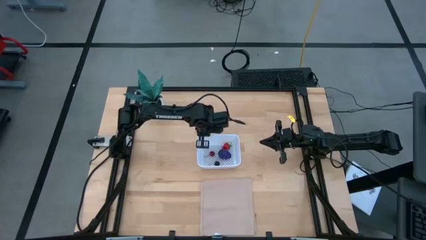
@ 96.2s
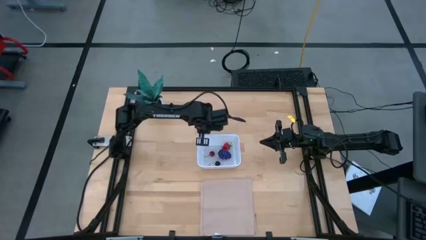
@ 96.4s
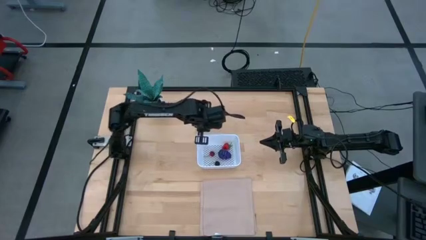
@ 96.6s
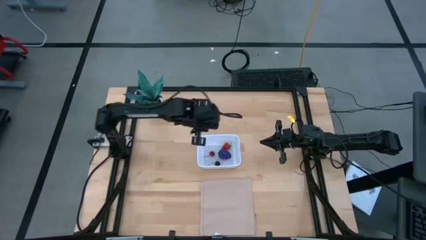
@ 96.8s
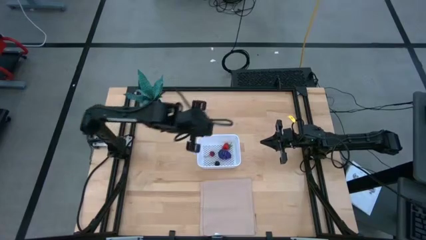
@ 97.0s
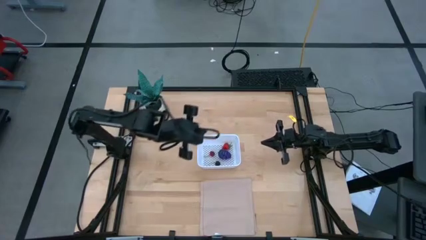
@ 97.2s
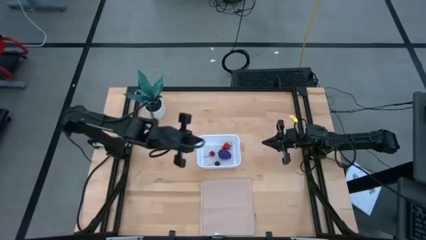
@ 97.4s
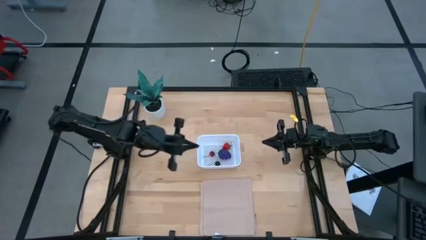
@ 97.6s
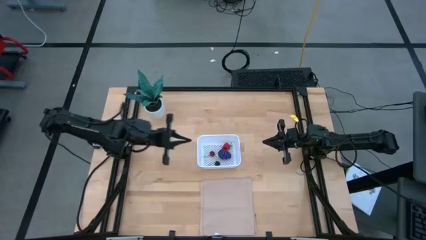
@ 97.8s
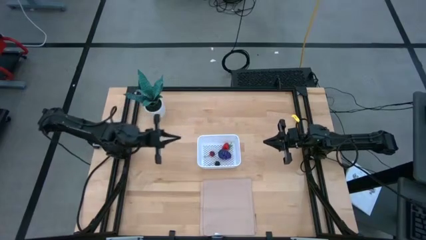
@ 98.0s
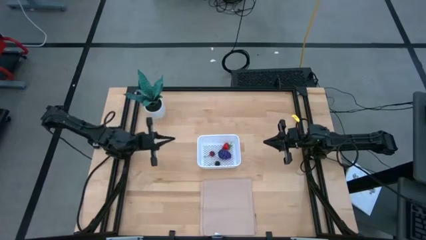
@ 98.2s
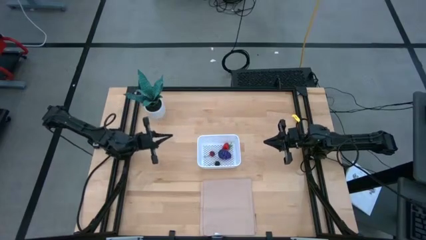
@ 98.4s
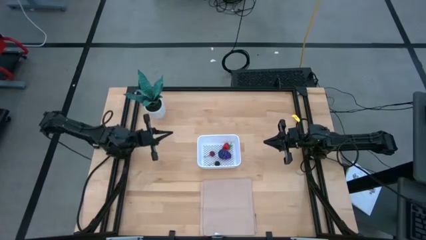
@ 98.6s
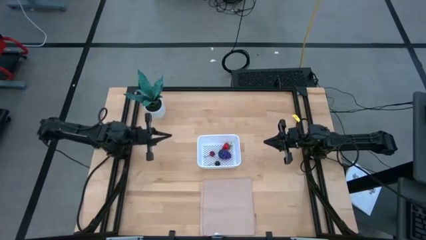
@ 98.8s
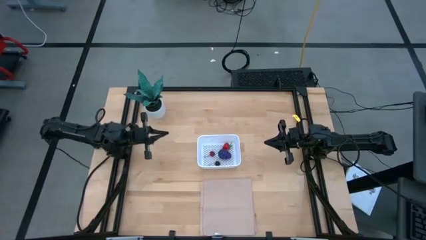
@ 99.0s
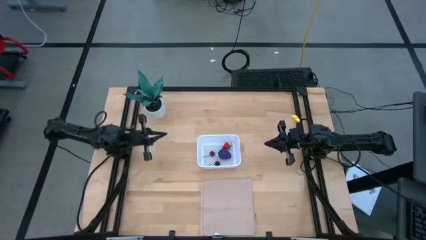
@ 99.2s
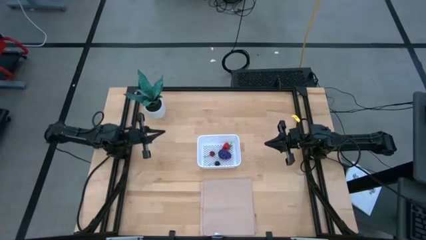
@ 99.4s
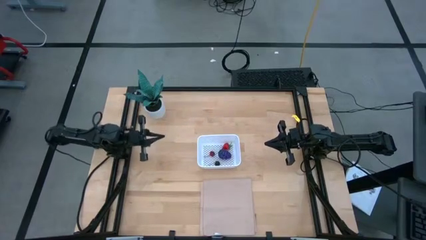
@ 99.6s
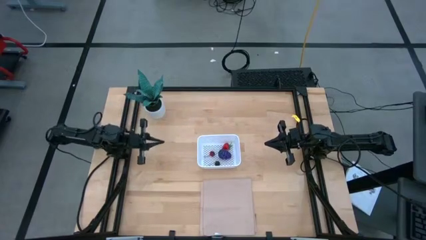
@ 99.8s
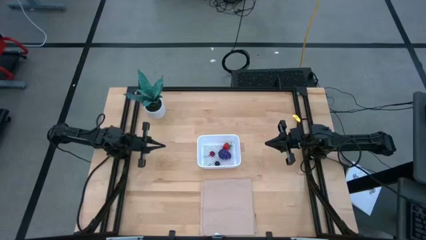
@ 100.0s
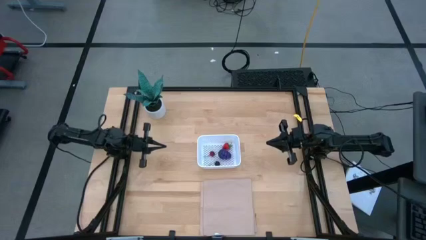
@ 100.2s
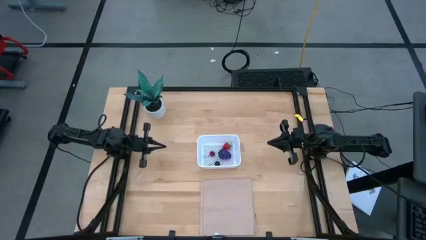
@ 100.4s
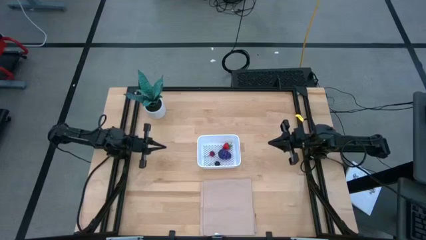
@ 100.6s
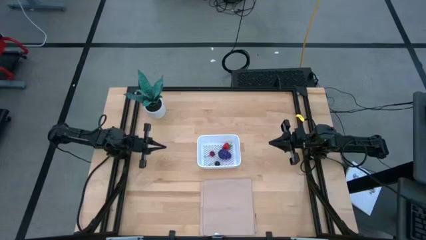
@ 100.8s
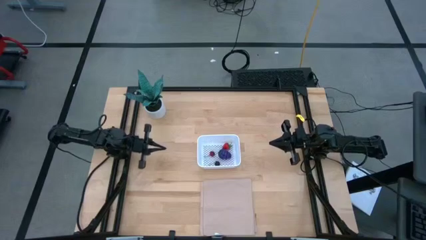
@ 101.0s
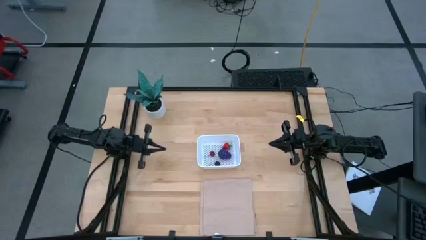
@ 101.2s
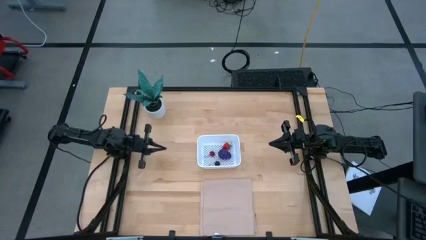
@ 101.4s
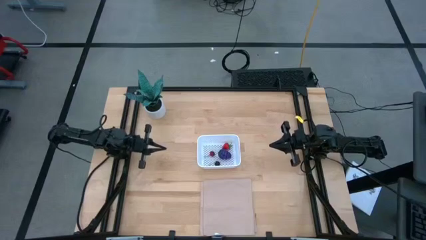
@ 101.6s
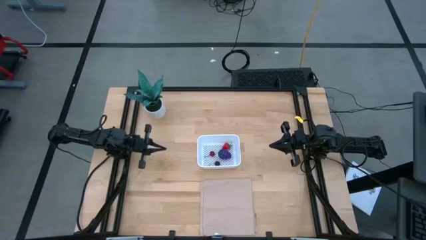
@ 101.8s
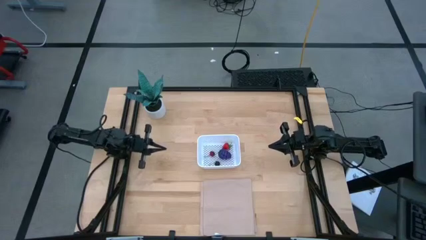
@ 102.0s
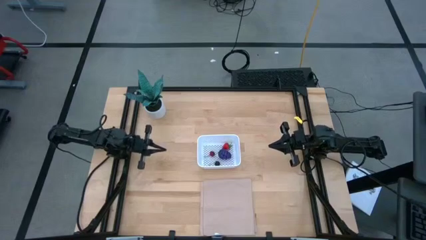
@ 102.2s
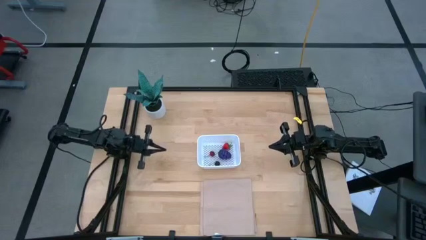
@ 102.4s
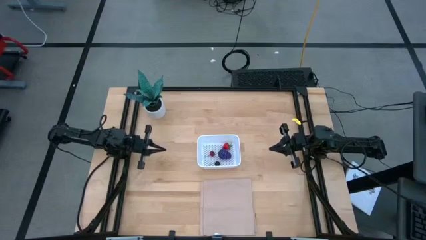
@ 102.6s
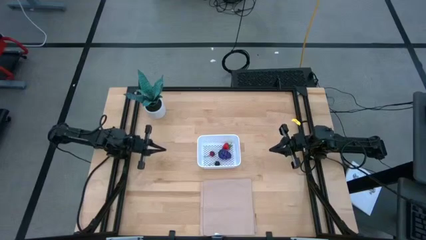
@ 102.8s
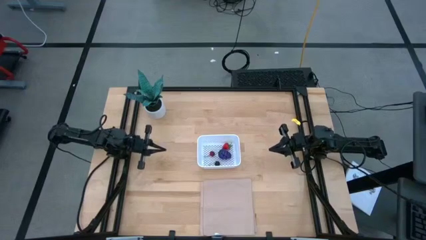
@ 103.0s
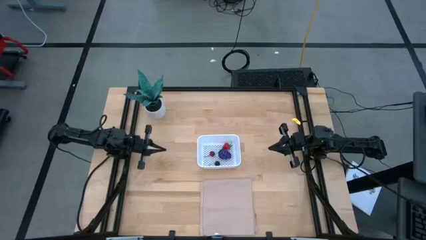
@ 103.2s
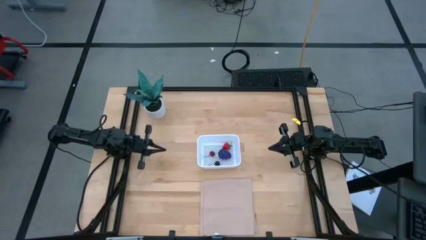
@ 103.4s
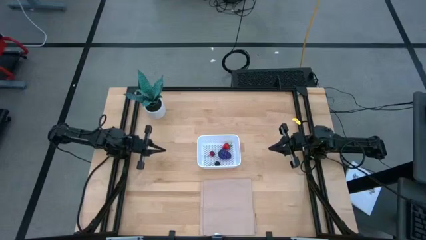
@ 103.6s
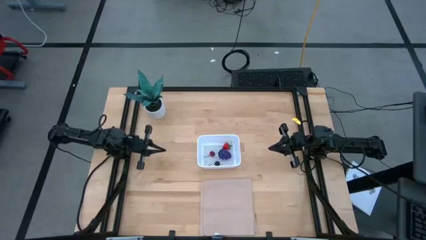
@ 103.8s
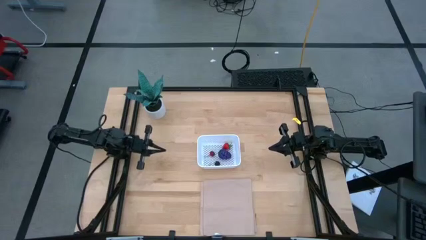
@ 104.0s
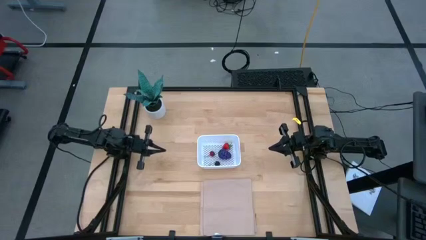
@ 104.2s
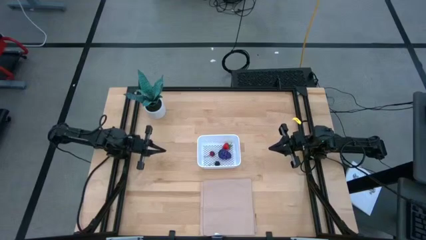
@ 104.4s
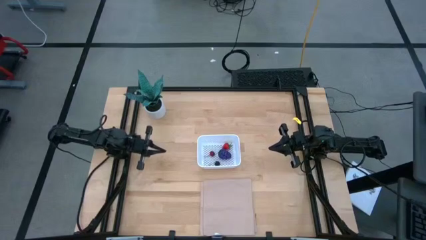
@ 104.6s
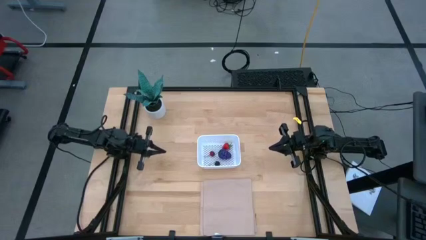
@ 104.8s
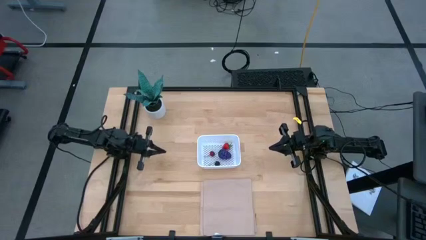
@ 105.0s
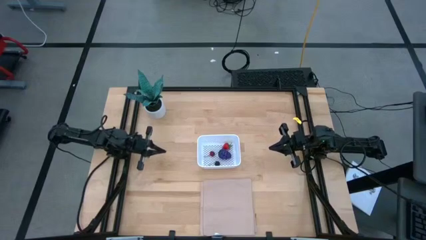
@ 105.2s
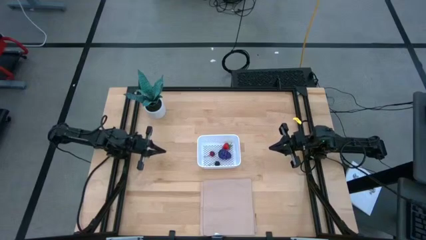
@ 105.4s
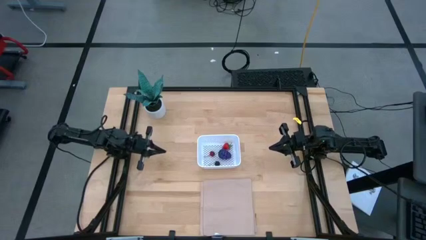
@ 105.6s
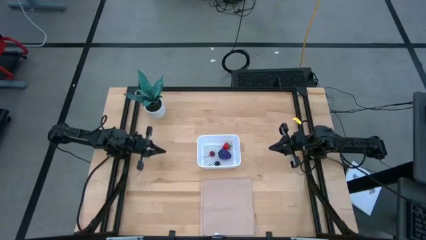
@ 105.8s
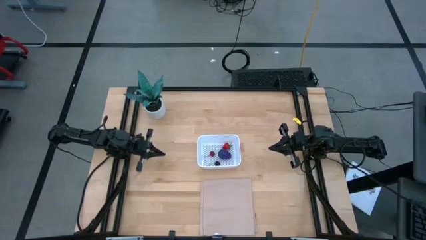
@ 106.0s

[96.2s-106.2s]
Task: Pick and placing Produce into tupperware
Return to home position

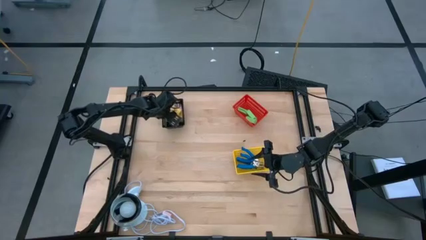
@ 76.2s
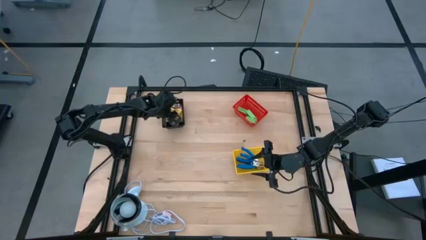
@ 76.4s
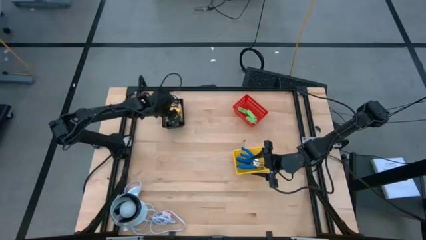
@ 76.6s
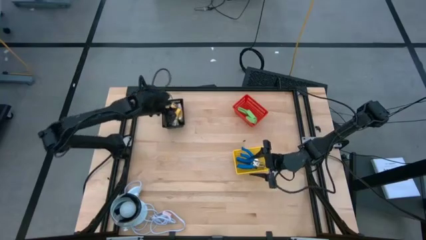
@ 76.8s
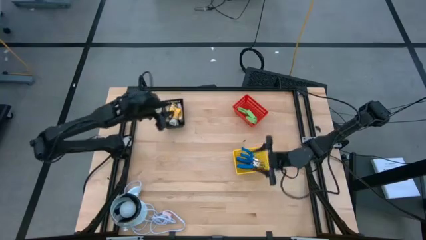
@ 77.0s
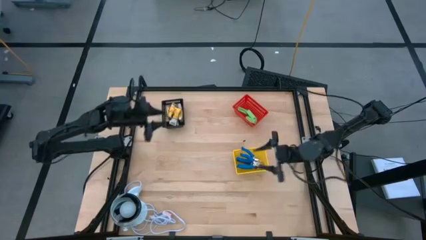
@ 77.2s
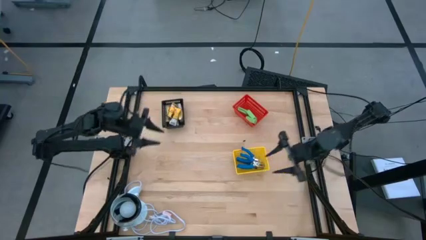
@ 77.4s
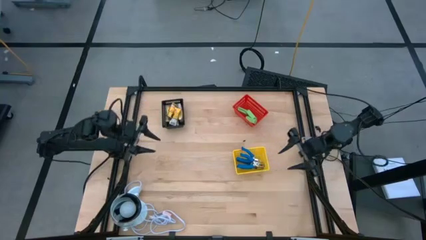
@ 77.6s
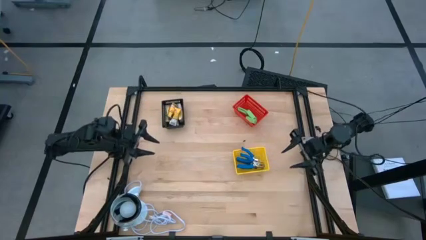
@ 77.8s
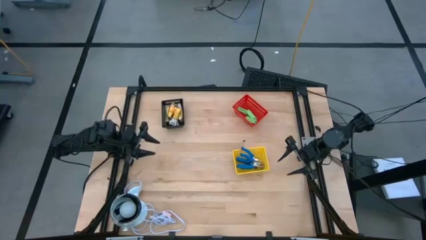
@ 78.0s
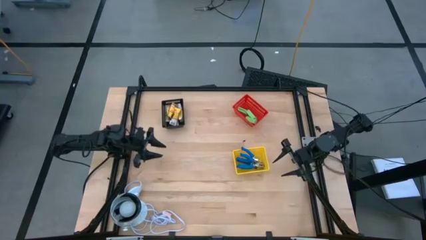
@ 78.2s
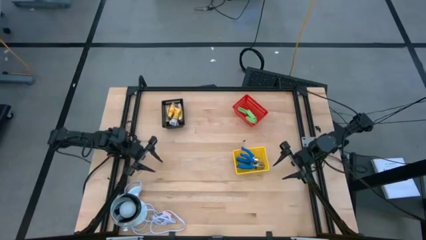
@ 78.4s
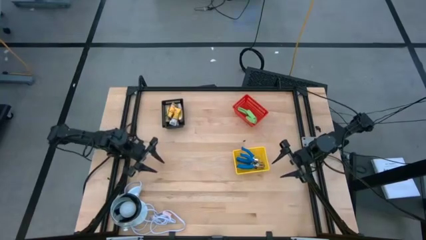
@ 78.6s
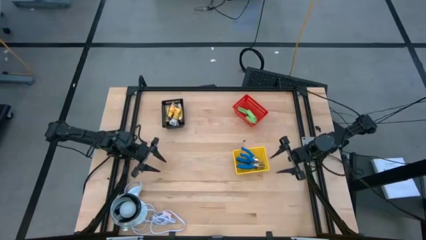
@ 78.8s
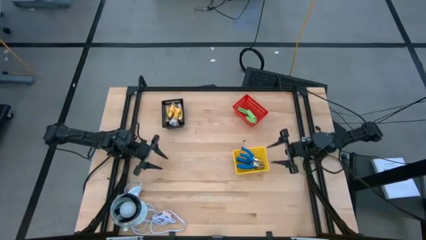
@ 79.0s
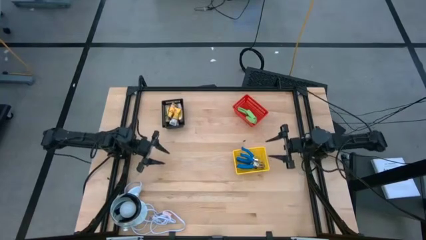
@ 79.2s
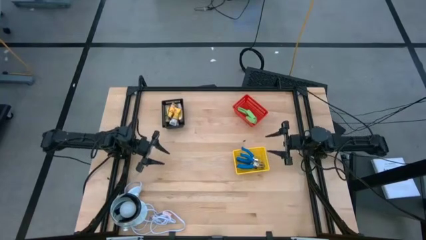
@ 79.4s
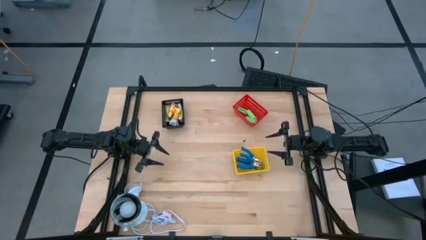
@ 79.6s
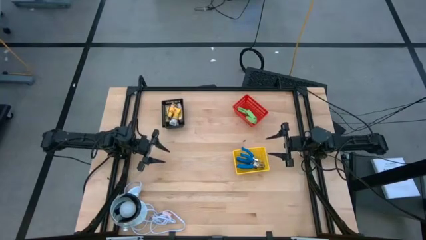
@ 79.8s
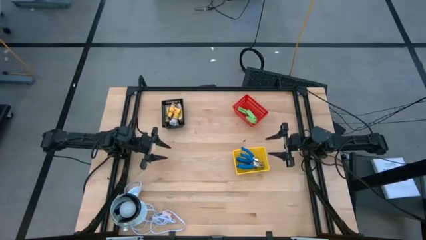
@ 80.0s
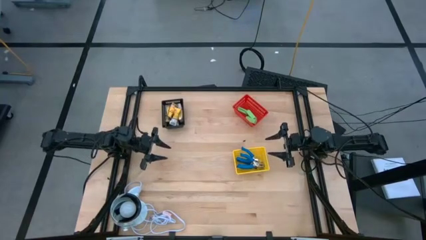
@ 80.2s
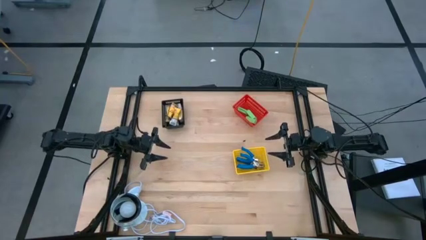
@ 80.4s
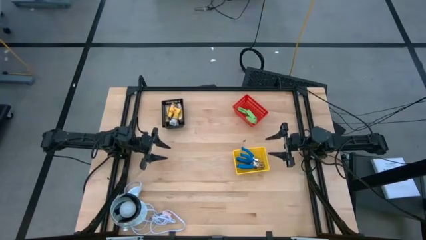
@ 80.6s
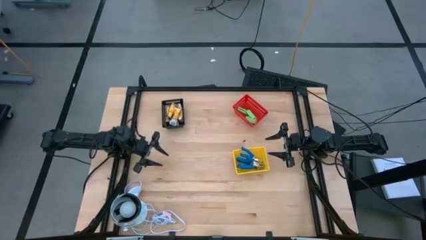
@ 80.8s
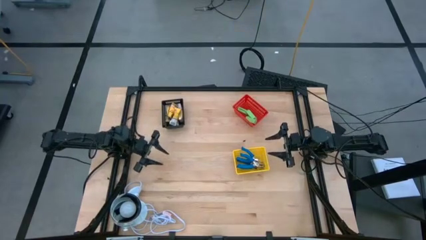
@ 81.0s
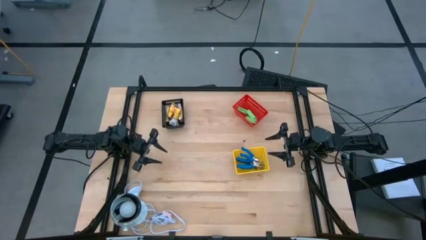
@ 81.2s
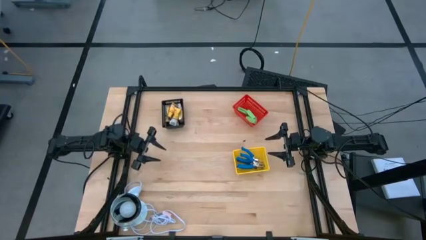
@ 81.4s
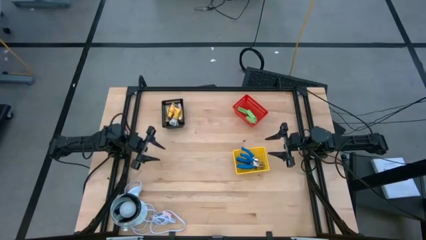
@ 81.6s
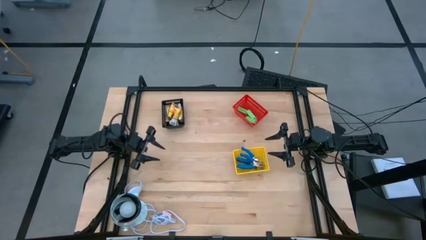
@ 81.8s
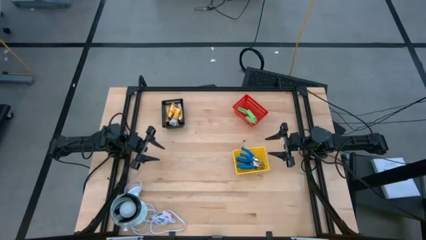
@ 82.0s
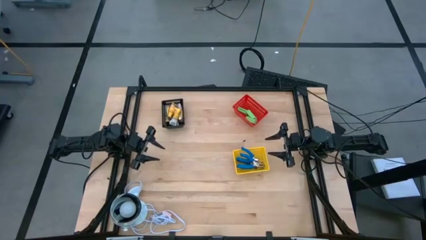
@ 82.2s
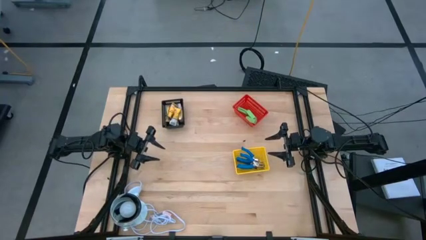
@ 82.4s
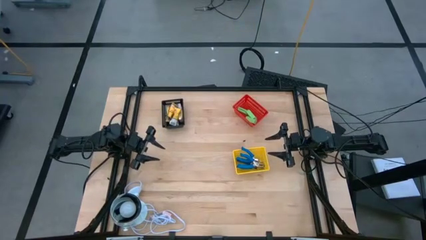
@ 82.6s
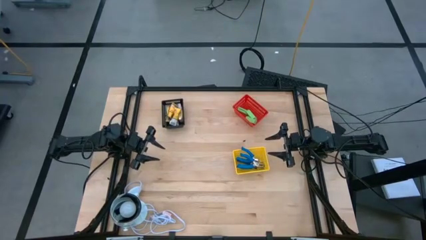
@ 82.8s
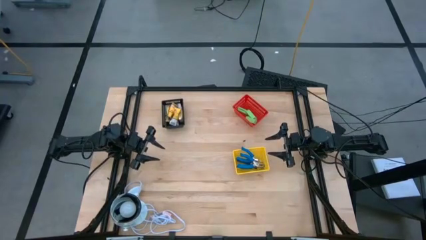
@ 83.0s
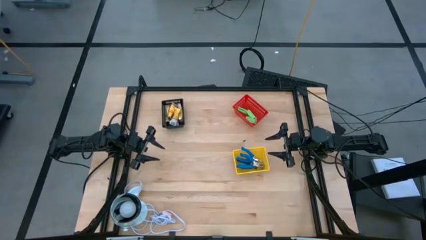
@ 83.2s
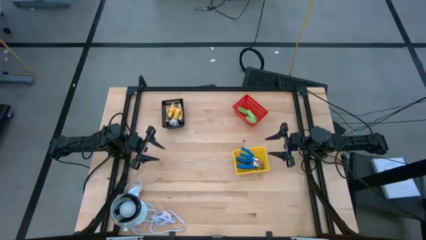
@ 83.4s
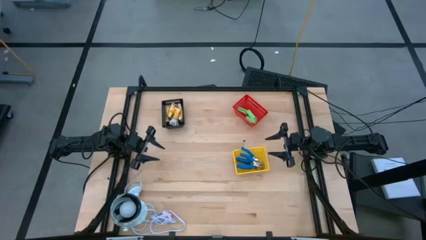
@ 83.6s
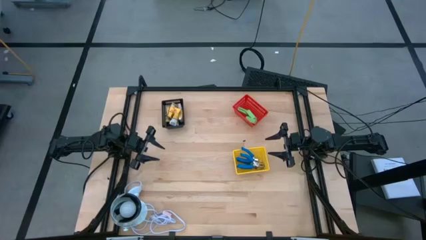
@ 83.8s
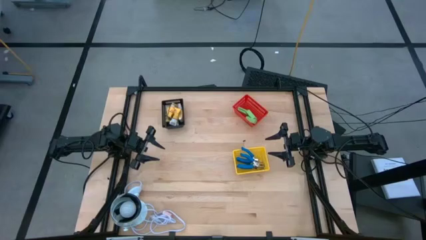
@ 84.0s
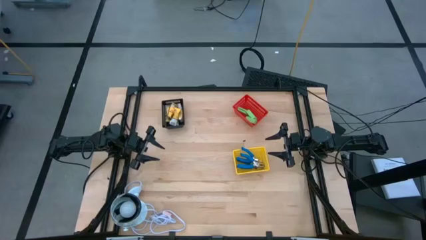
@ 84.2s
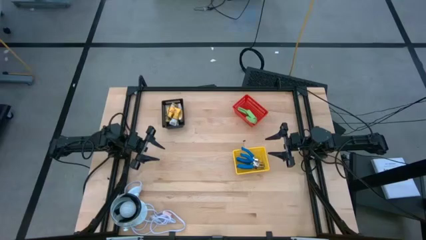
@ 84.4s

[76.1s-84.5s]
Task: Pick & Place School Supplies
Return to Home Position
